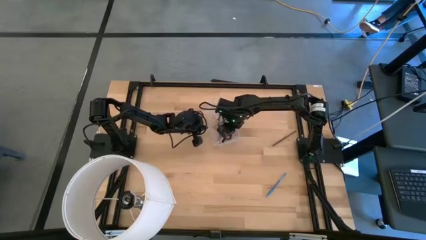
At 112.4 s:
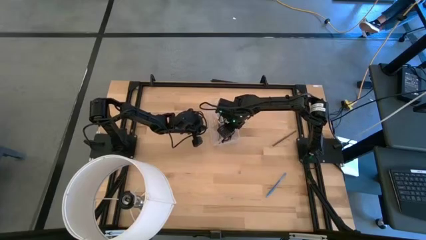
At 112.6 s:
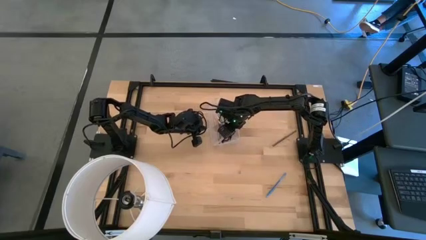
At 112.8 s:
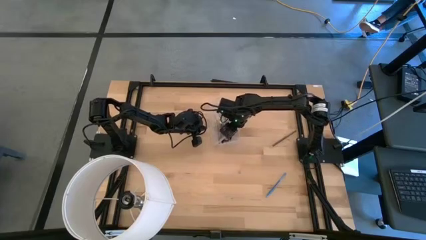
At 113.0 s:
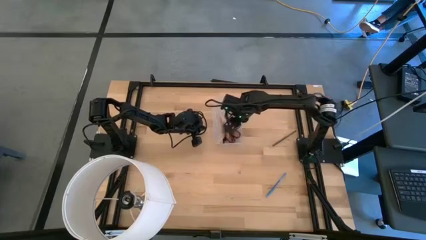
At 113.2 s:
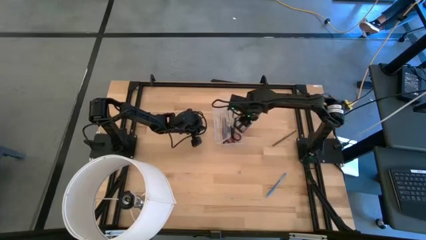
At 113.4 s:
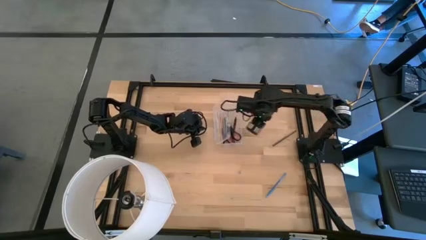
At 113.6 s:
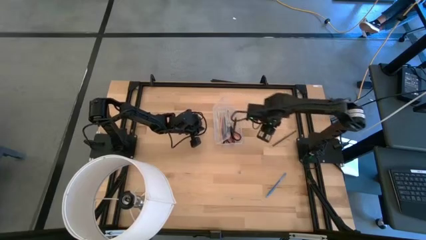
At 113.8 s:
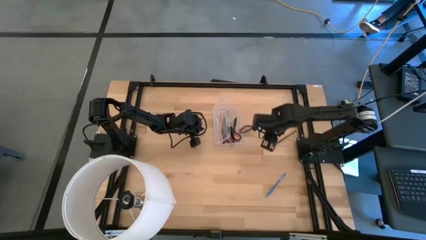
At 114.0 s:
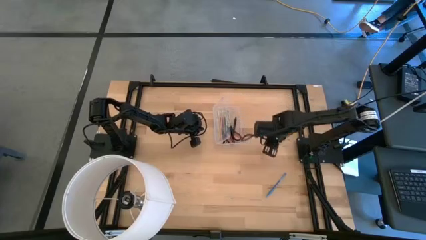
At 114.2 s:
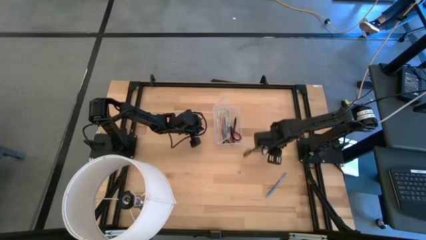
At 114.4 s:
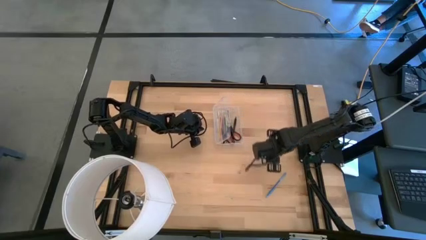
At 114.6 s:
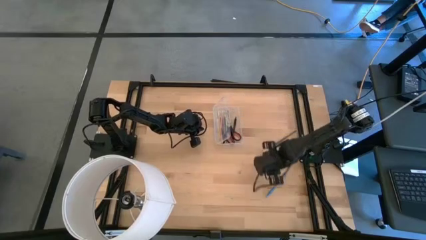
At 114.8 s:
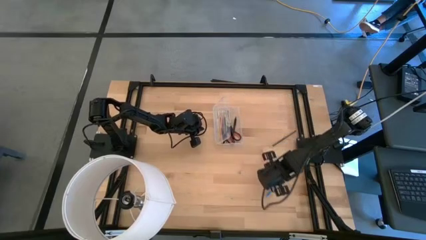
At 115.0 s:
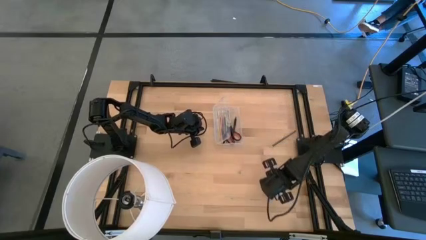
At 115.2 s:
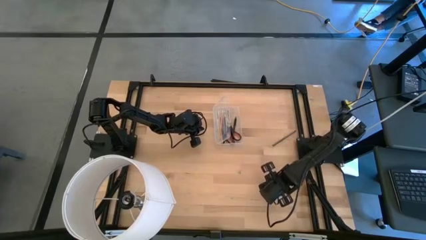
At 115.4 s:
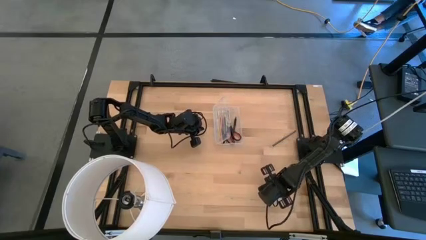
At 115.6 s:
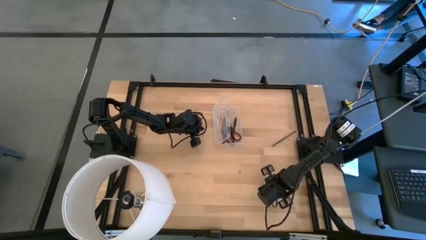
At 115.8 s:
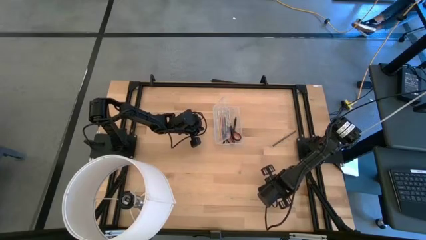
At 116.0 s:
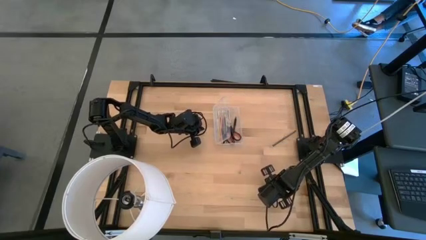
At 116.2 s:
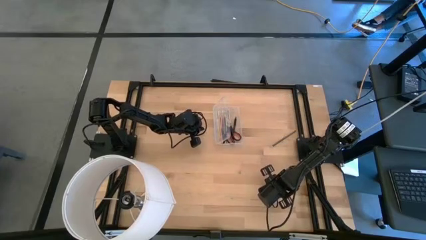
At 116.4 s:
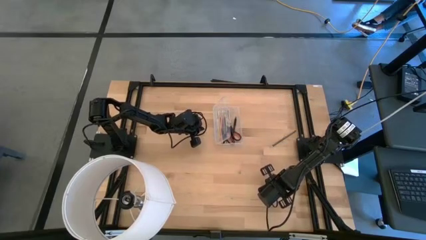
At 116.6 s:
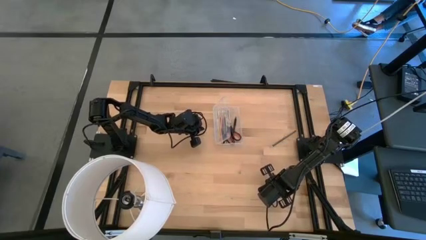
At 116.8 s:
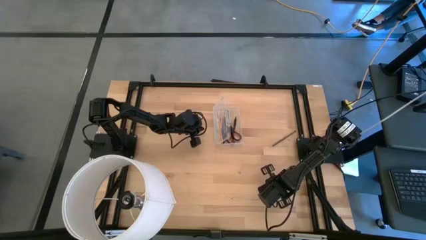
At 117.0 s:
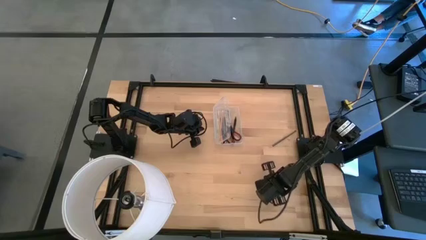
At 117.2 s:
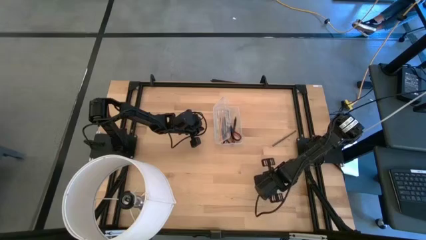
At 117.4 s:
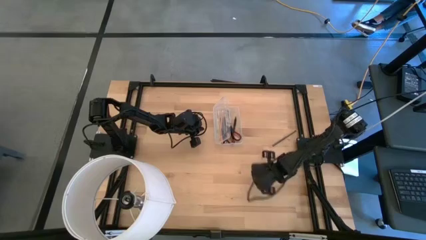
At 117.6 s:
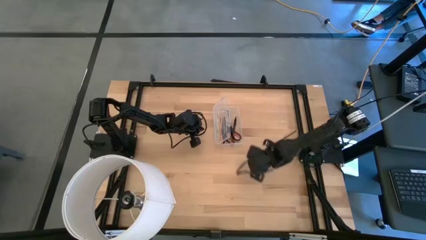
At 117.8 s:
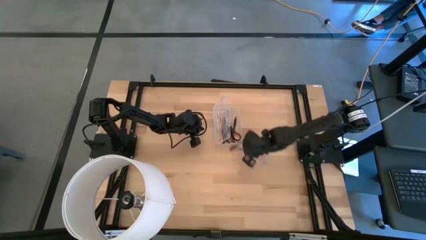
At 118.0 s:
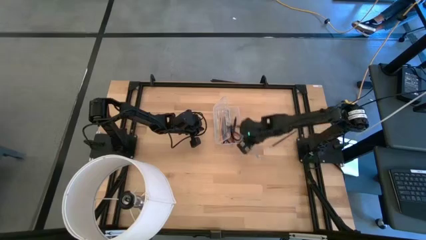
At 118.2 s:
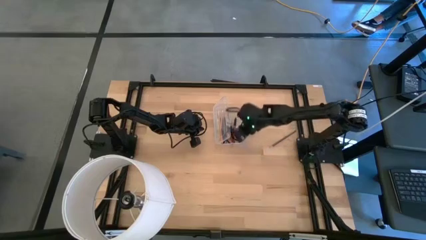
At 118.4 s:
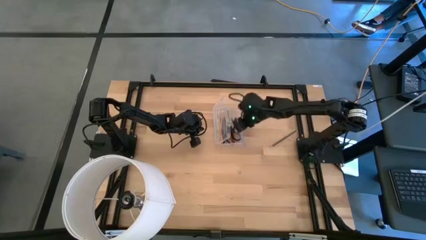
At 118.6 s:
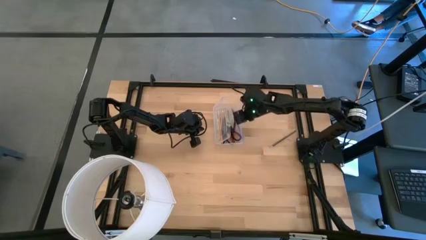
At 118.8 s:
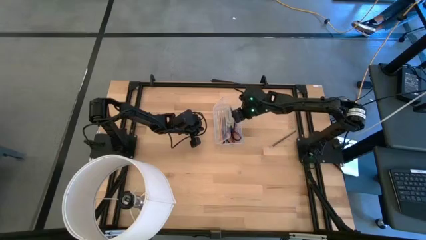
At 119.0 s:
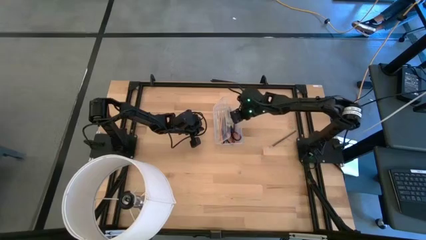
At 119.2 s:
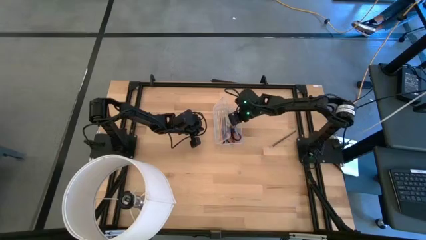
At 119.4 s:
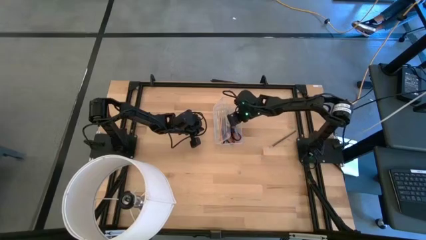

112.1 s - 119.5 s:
Task: Pick & place school supplies into a supply box
Put the blue pen into the transparent supply box

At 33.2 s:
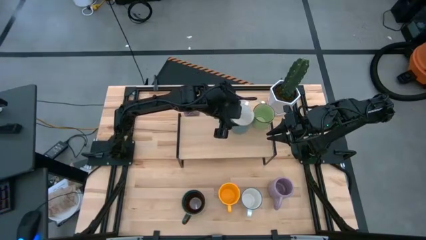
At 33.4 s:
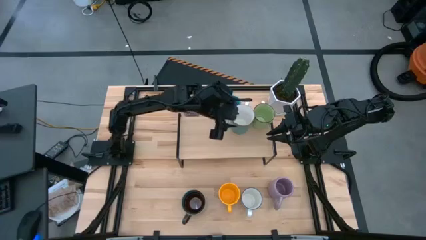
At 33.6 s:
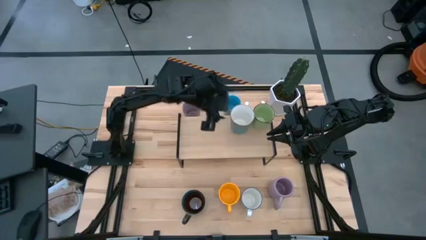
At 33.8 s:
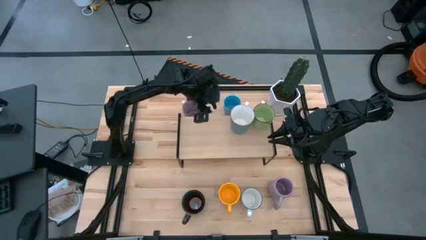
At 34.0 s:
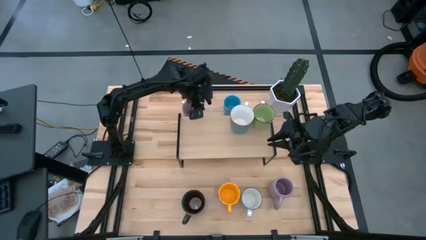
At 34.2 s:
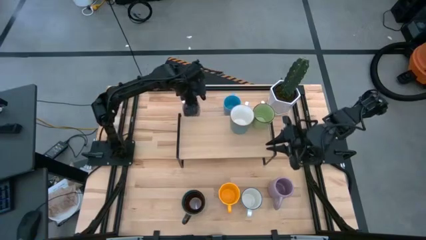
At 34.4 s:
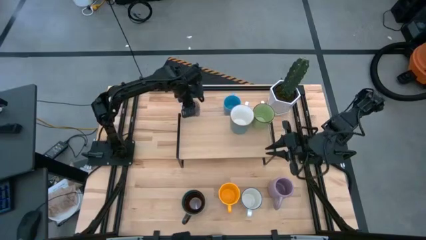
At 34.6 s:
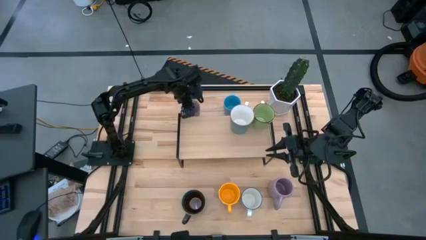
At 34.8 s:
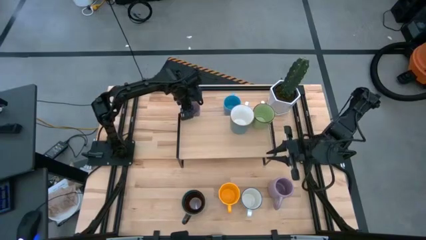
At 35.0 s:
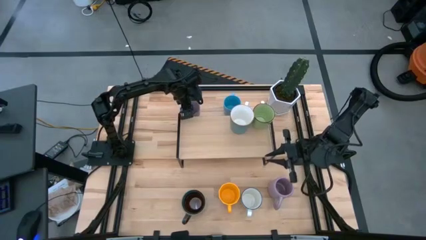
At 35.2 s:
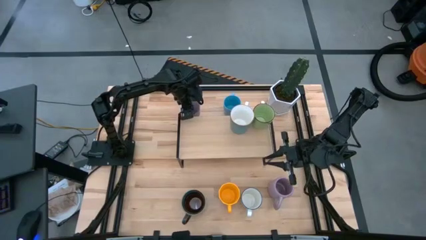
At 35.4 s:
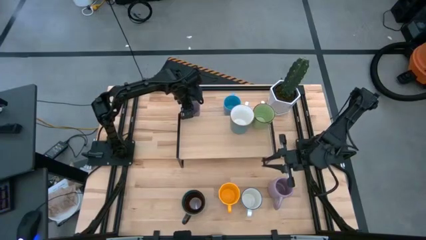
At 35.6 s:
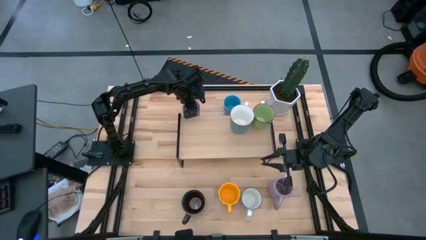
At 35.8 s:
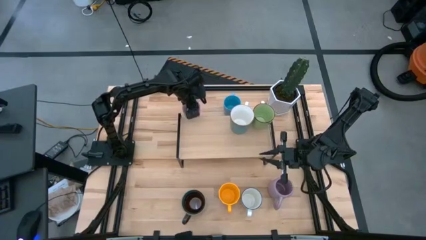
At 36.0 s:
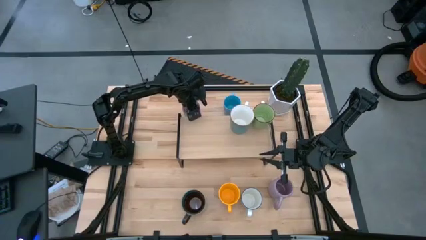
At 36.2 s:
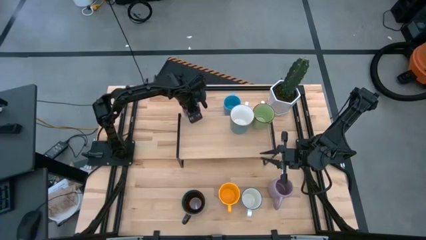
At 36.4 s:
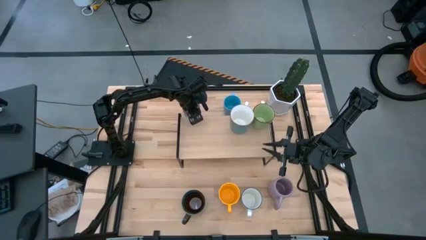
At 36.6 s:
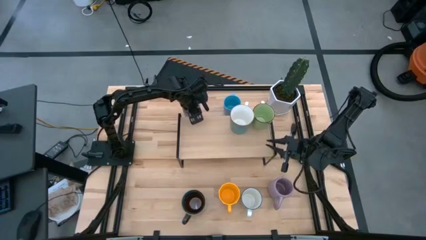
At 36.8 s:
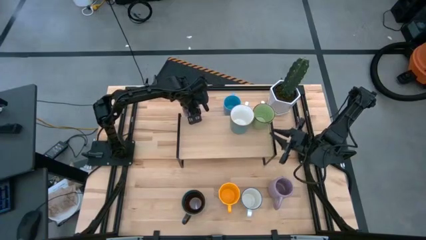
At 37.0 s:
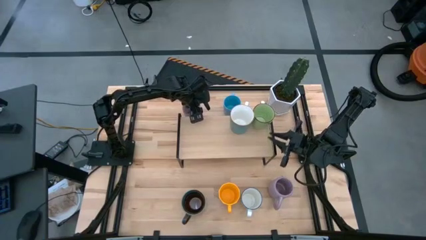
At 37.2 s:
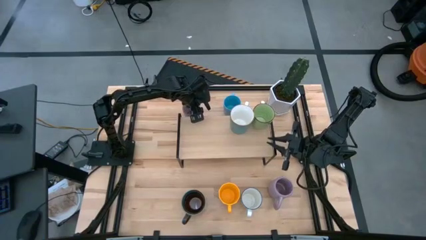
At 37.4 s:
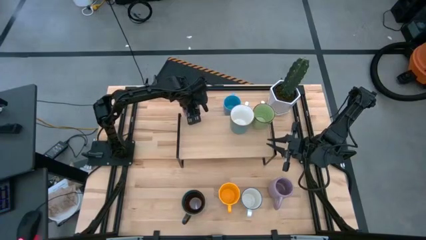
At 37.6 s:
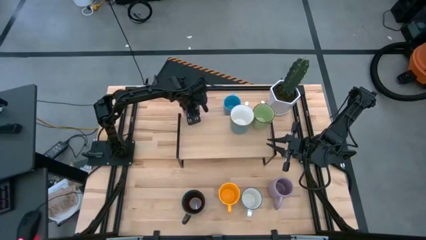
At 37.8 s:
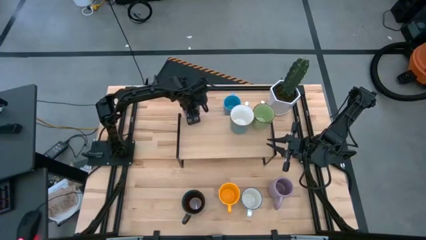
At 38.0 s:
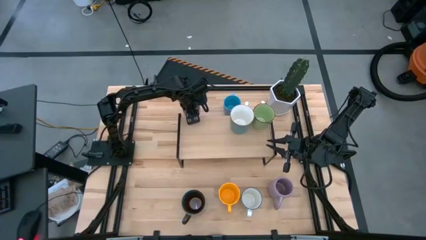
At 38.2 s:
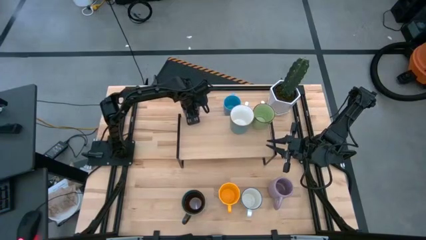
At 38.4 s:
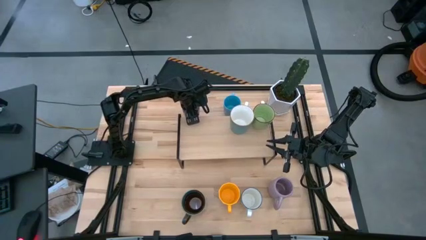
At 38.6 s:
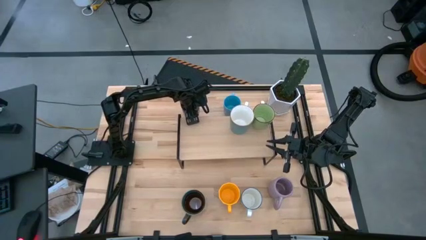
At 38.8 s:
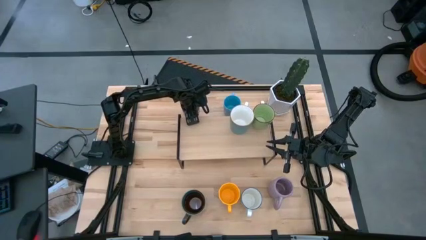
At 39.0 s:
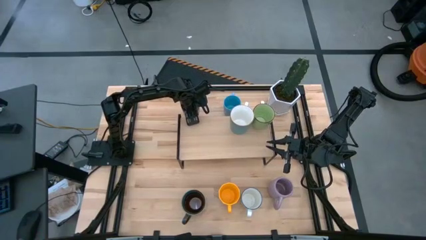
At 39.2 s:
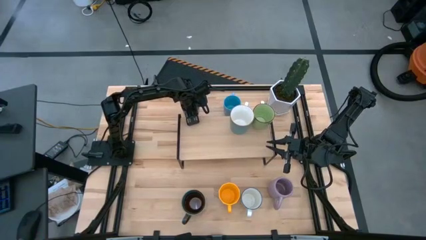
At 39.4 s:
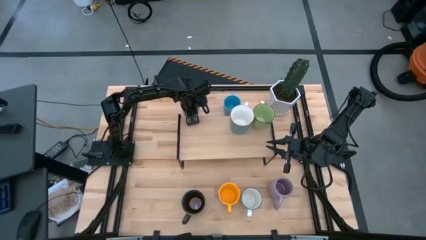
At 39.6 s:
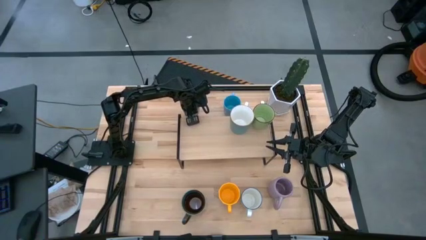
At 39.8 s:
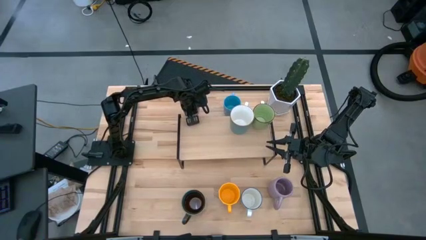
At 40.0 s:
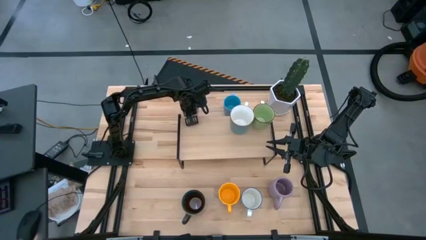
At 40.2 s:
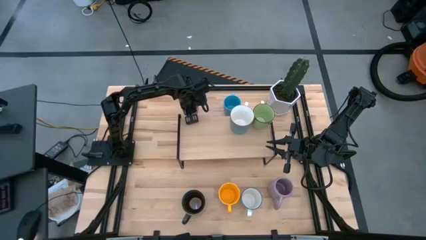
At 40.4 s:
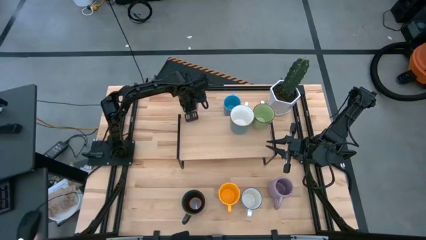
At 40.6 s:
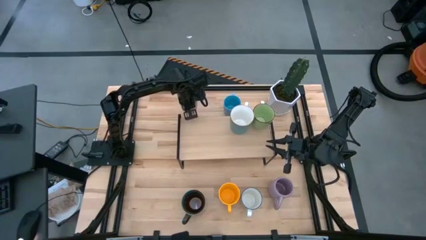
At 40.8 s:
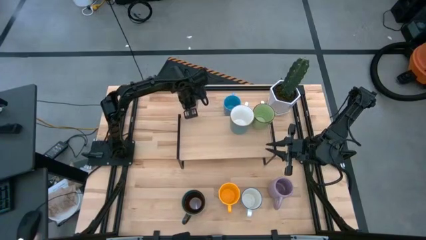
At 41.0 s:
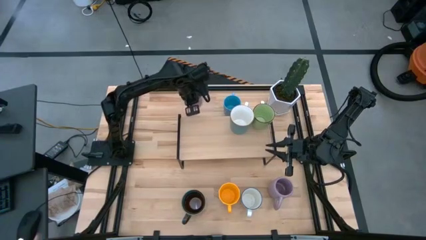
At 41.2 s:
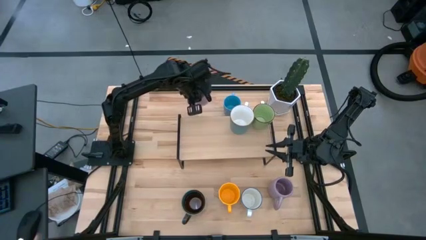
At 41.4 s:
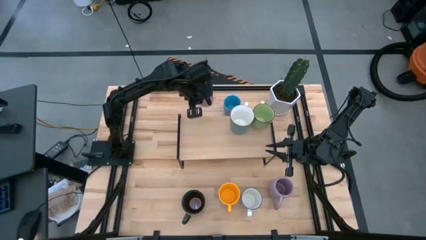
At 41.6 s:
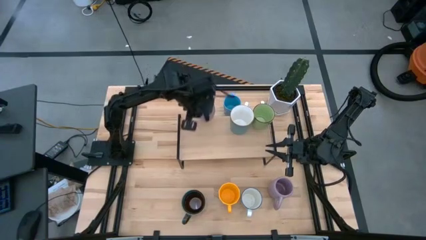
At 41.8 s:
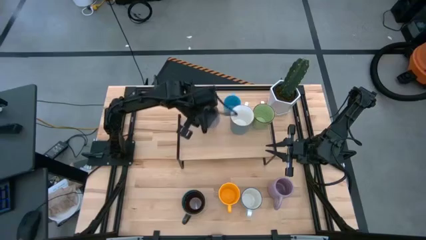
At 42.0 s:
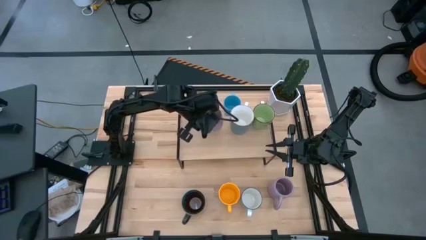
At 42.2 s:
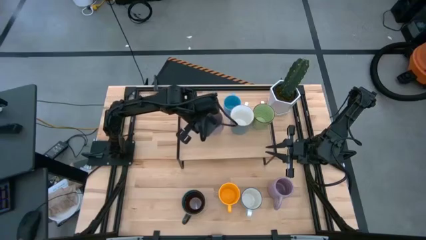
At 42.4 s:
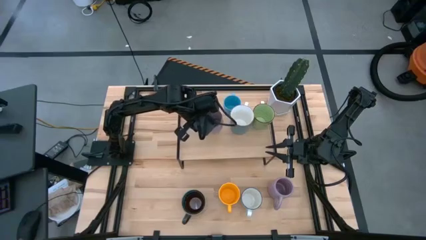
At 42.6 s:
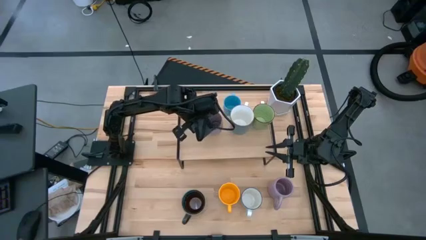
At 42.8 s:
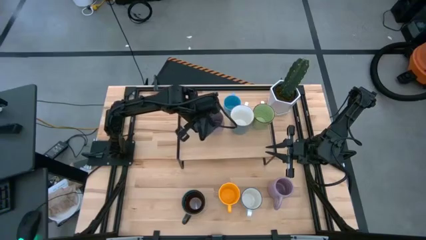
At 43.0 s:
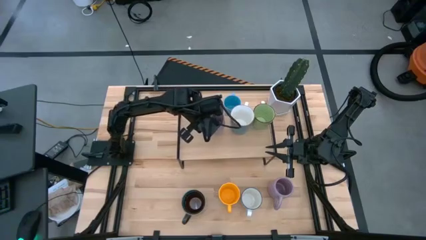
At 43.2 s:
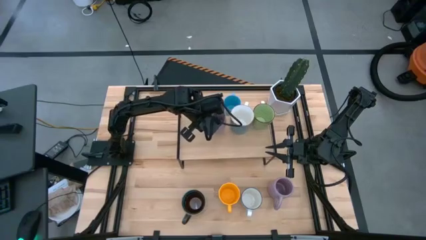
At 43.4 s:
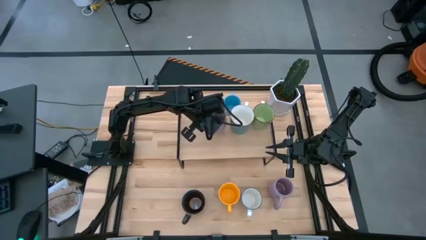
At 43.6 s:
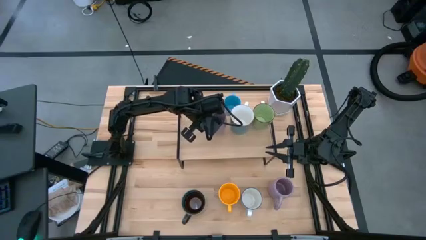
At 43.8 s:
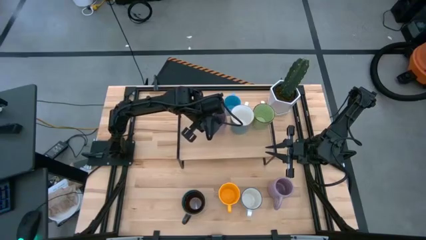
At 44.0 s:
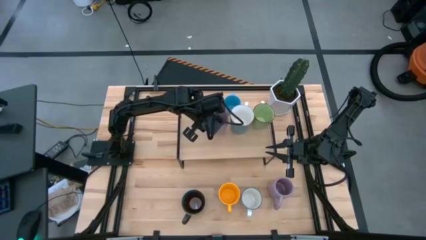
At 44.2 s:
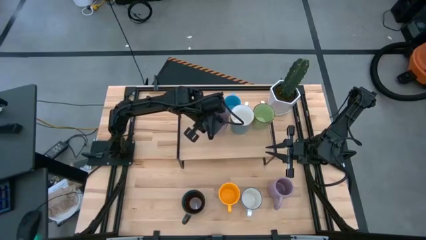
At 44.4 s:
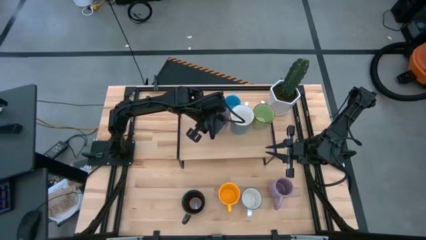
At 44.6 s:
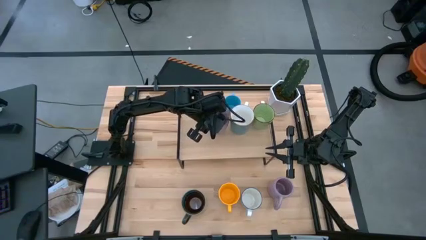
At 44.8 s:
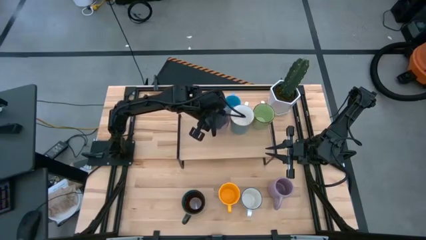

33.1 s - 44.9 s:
Task: Place coffee mugs
Put the top purple mug on the shelf
